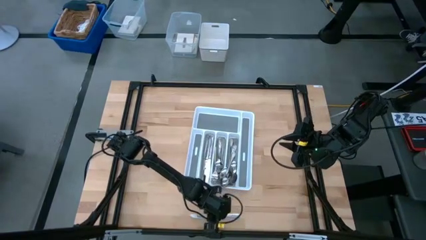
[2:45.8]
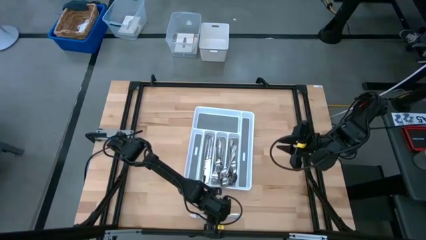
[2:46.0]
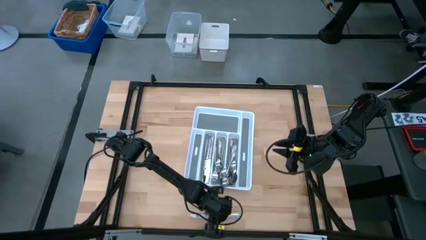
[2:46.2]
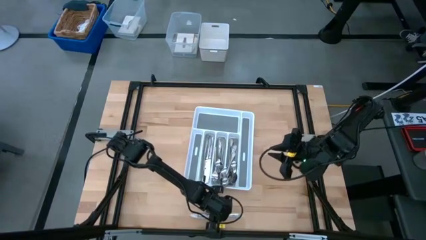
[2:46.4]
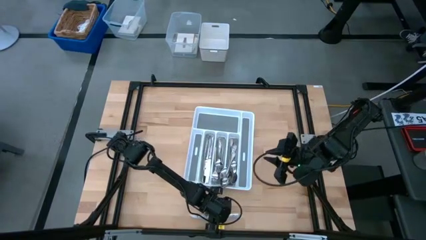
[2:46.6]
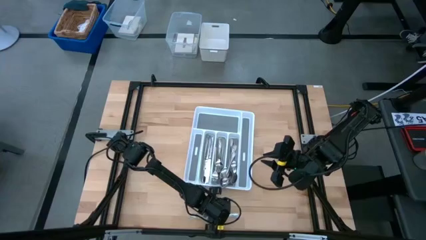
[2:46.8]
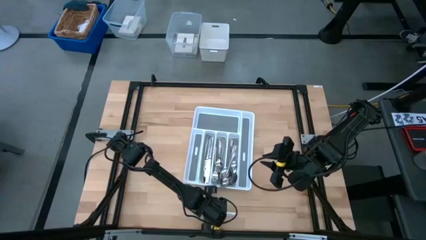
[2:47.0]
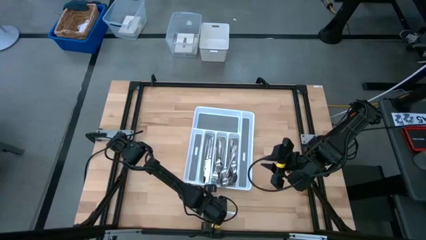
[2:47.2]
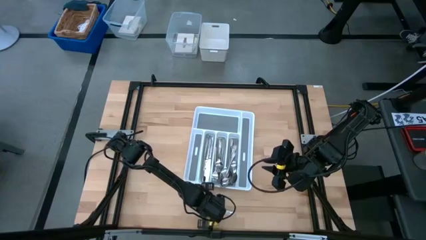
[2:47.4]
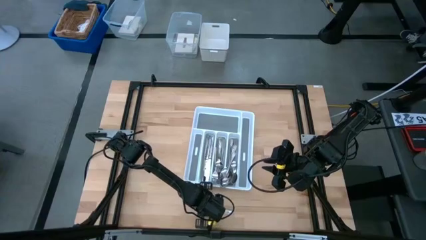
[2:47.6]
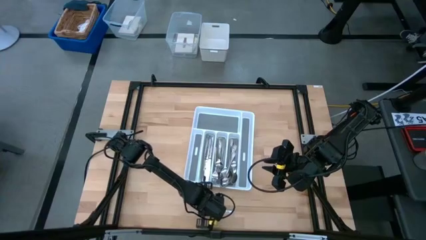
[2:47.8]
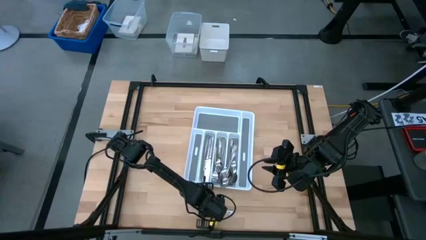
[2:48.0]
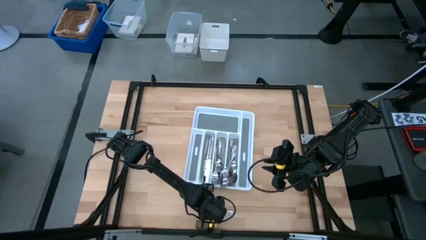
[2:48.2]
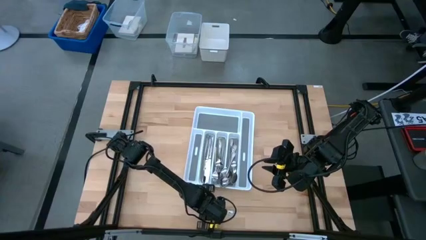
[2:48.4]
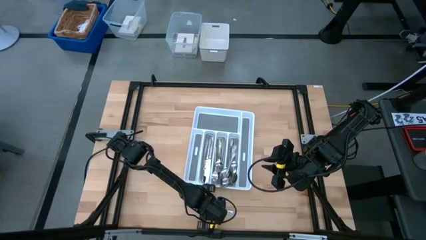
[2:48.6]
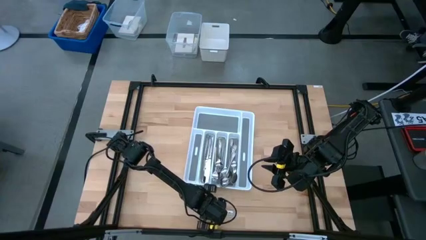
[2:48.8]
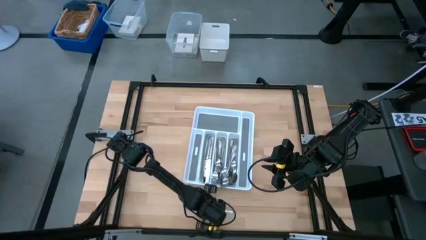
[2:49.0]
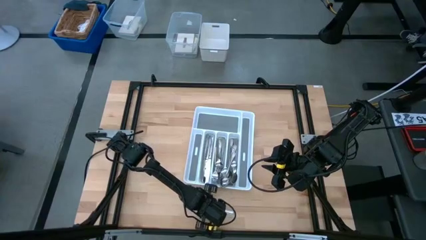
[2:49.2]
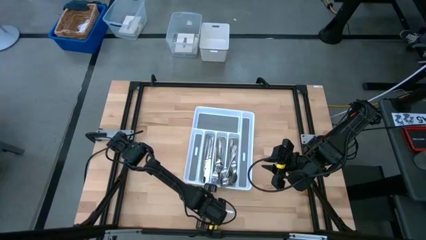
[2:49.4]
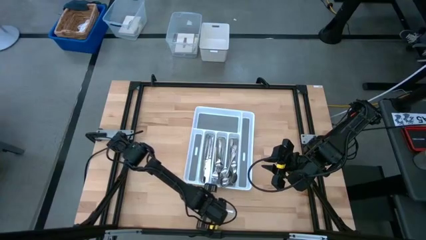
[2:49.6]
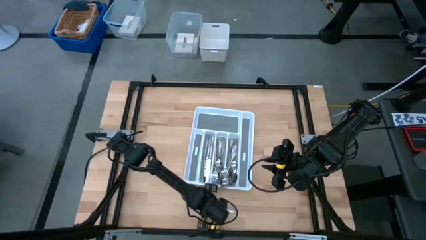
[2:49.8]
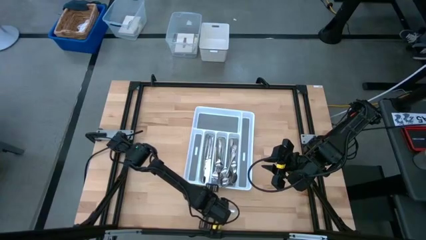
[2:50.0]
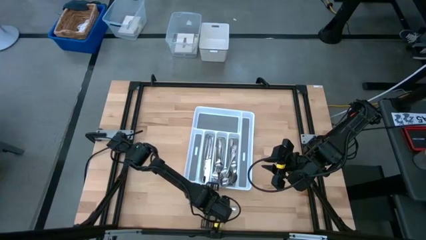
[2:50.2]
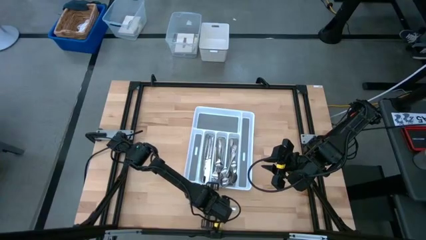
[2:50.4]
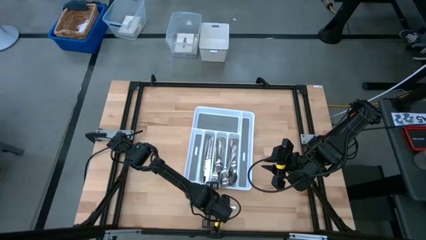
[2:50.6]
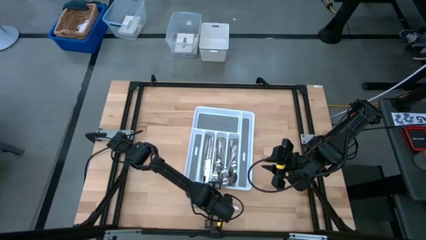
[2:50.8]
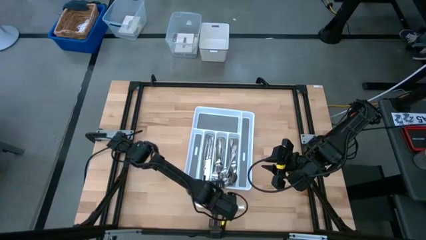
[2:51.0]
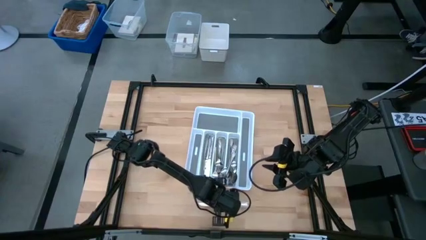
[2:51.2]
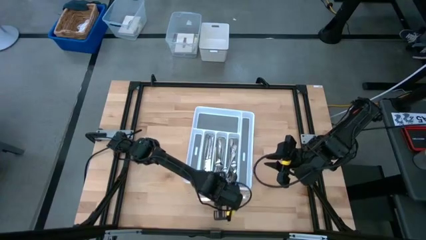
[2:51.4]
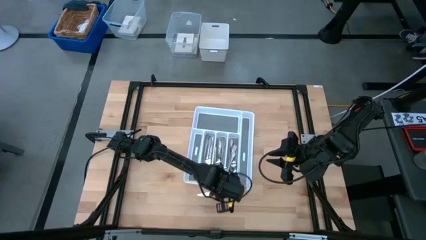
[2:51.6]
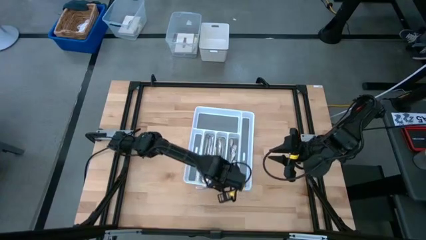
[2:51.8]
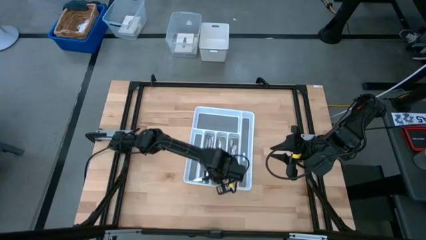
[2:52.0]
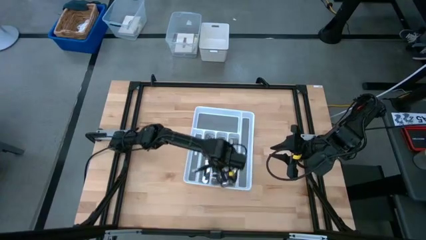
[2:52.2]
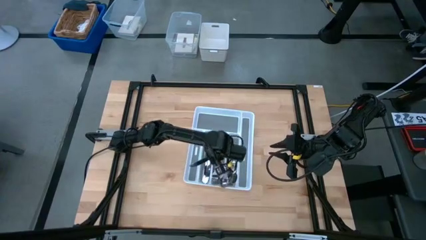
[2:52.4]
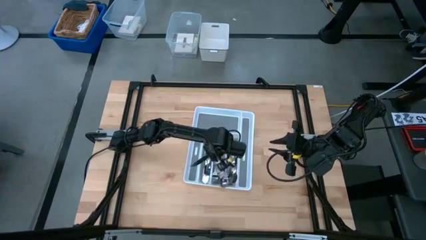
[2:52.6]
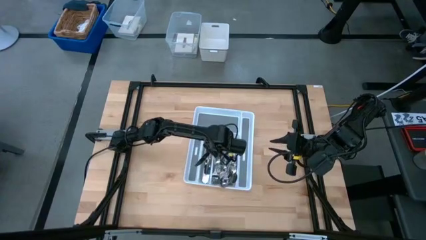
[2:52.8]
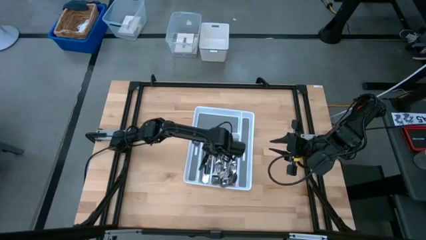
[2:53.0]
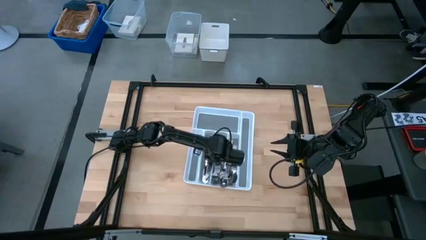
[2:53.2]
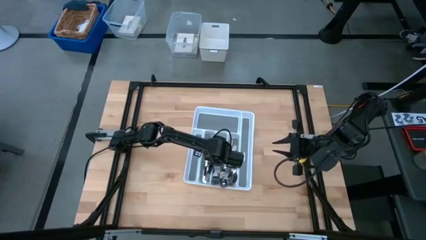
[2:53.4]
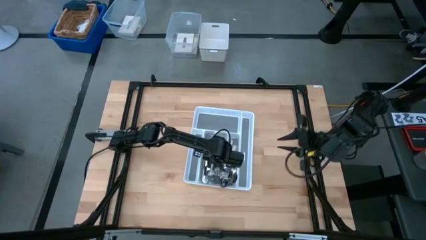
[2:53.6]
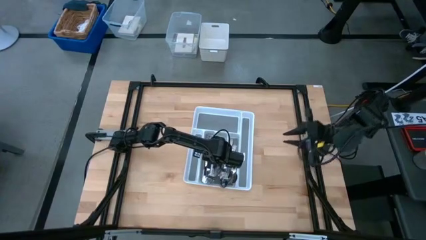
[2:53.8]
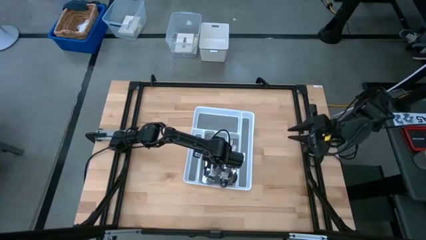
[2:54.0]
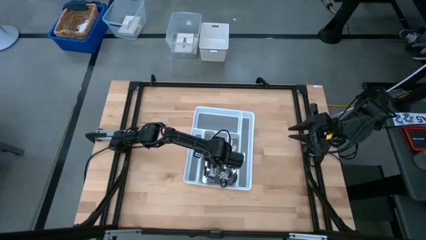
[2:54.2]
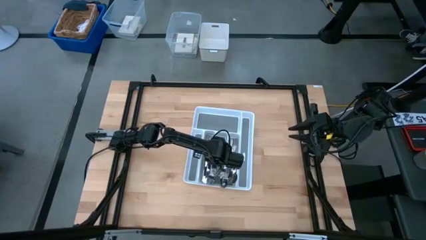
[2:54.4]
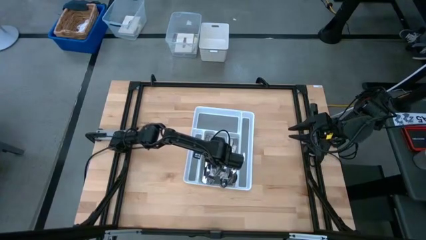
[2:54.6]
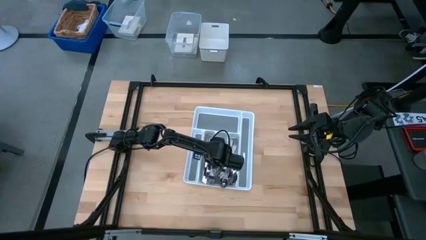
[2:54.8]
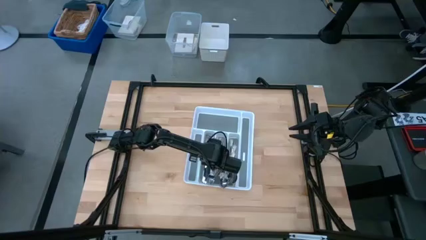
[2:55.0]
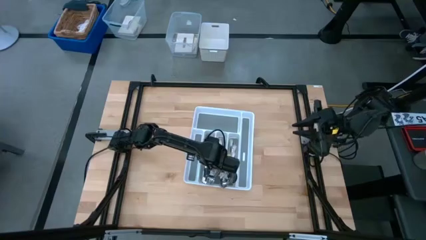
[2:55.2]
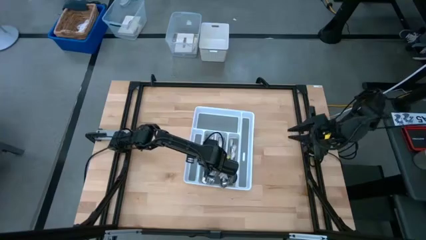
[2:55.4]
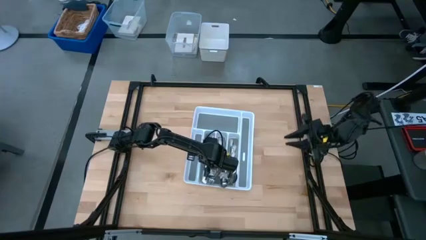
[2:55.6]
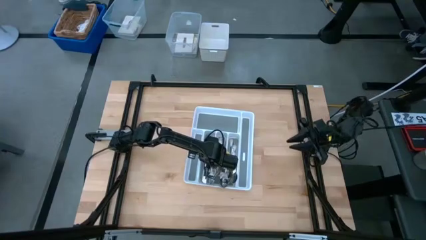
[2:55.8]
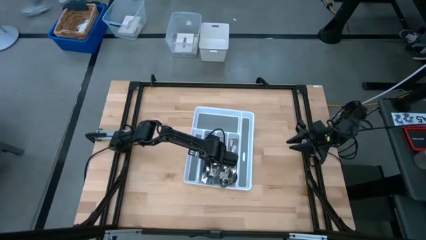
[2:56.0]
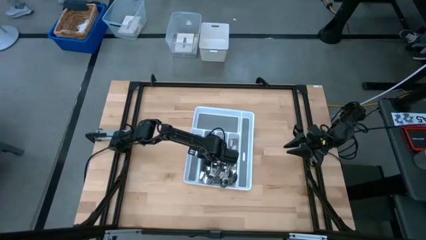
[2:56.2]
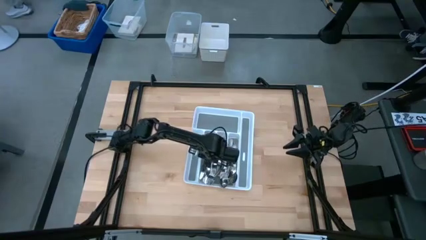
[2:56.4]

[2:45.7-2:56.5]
Task: Sort silverware
Put the silver table knife into the white cutlery tray

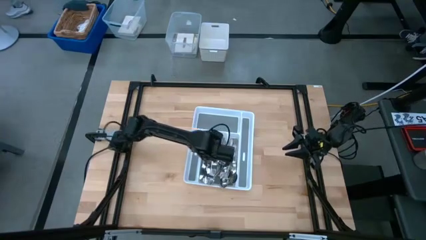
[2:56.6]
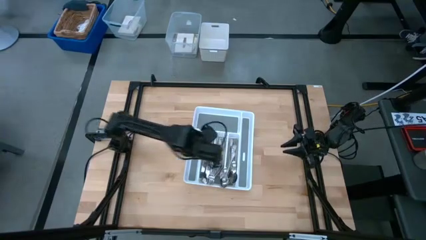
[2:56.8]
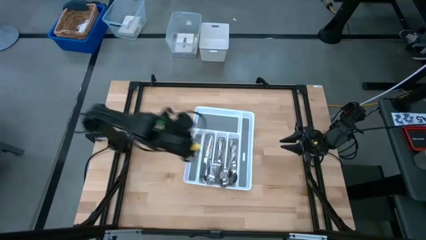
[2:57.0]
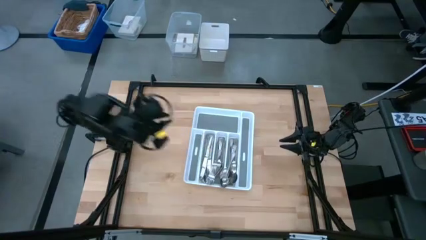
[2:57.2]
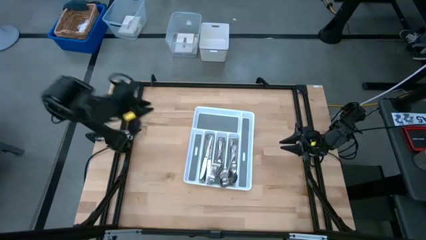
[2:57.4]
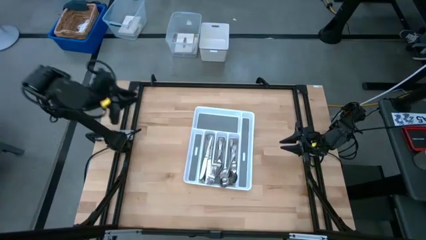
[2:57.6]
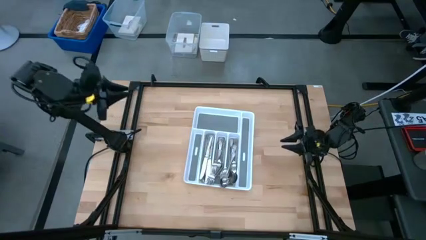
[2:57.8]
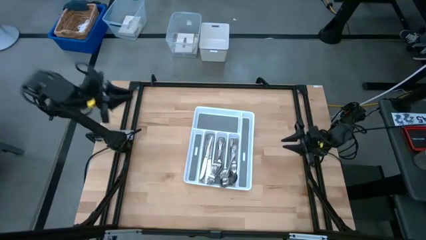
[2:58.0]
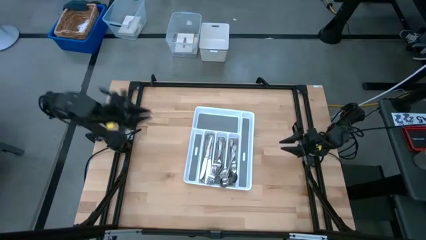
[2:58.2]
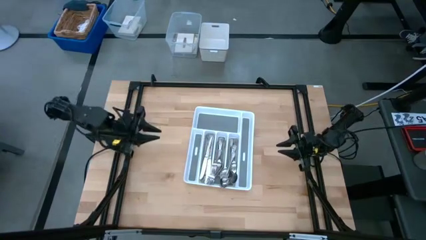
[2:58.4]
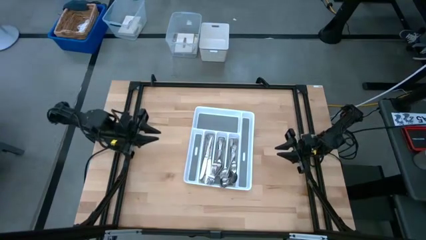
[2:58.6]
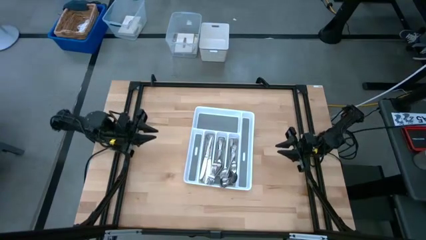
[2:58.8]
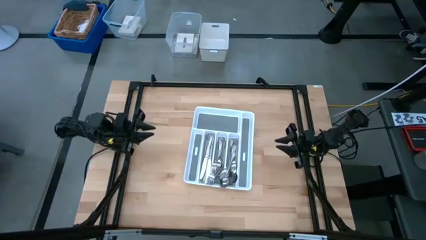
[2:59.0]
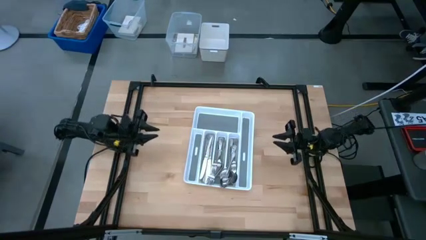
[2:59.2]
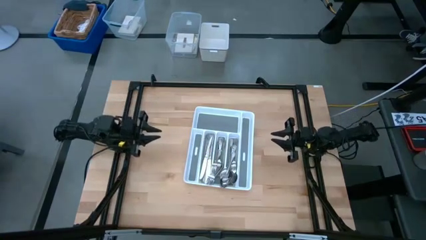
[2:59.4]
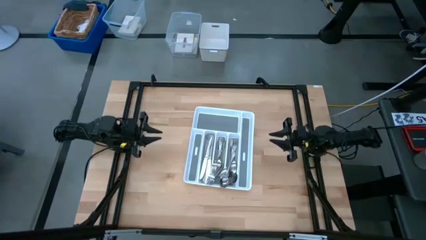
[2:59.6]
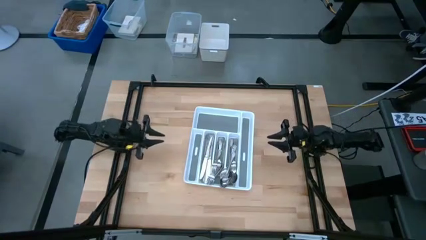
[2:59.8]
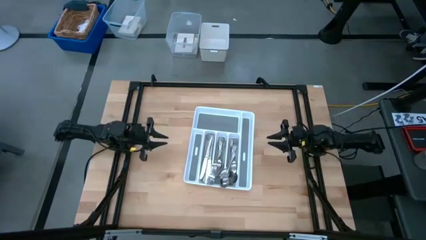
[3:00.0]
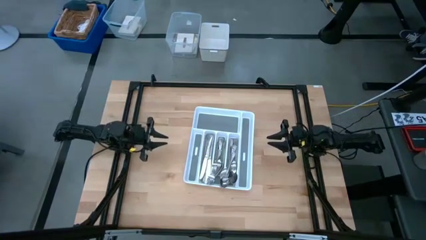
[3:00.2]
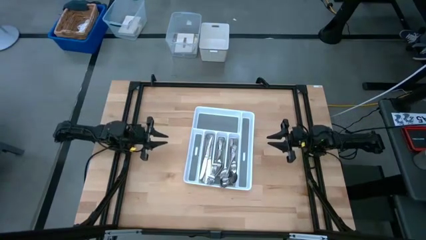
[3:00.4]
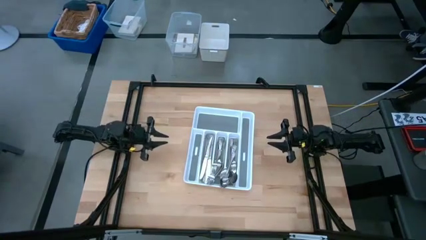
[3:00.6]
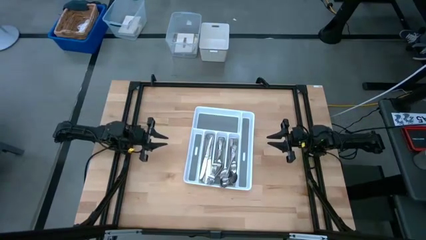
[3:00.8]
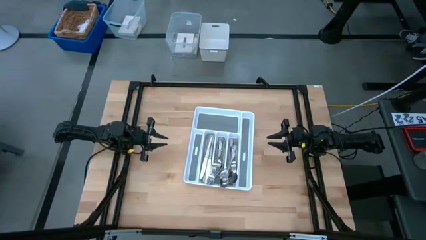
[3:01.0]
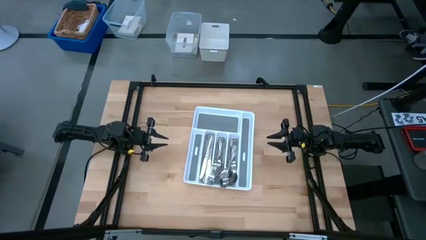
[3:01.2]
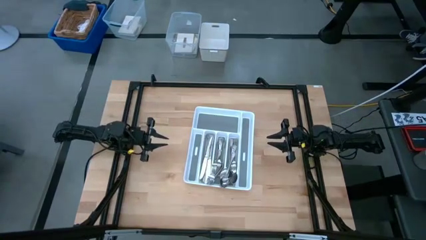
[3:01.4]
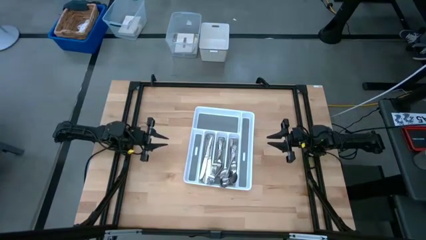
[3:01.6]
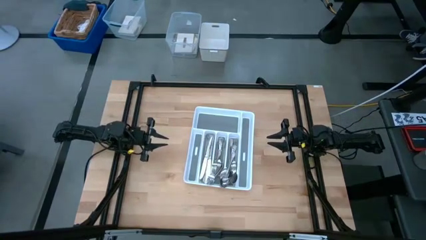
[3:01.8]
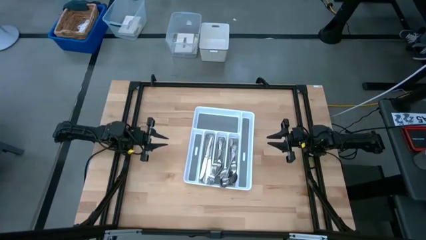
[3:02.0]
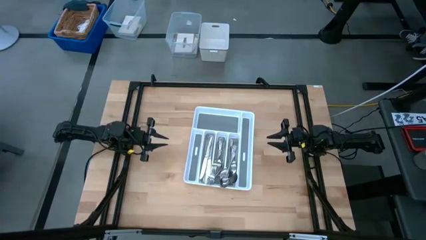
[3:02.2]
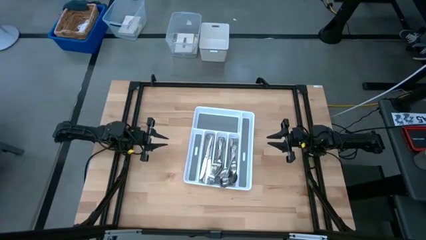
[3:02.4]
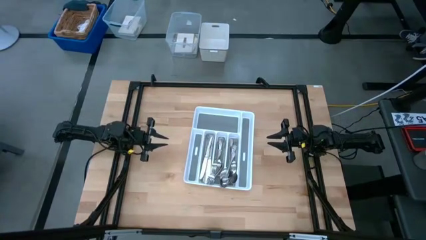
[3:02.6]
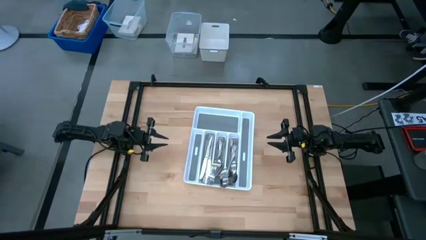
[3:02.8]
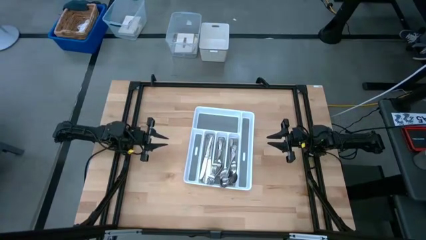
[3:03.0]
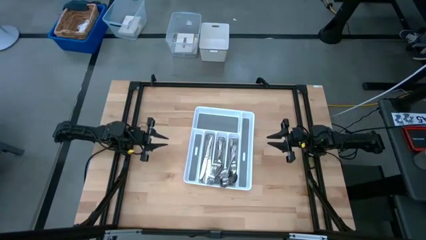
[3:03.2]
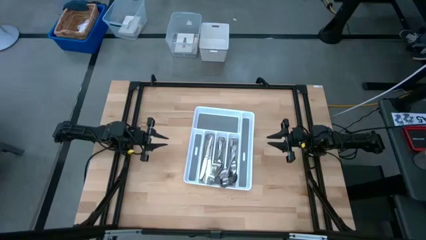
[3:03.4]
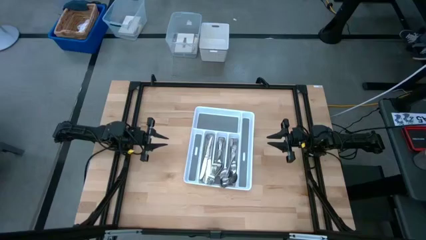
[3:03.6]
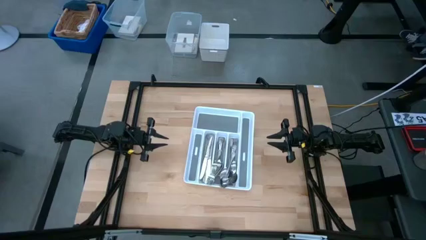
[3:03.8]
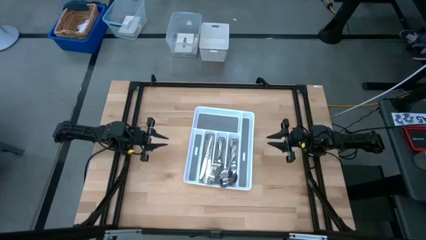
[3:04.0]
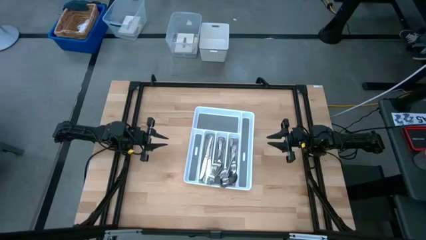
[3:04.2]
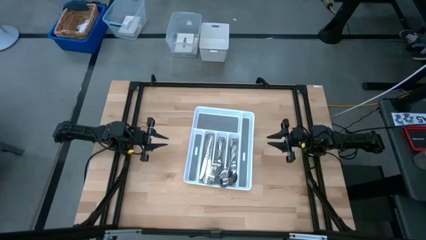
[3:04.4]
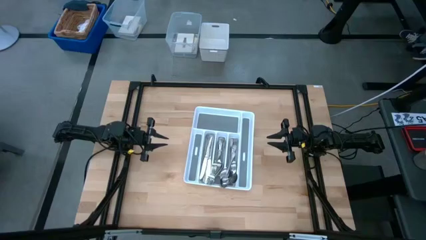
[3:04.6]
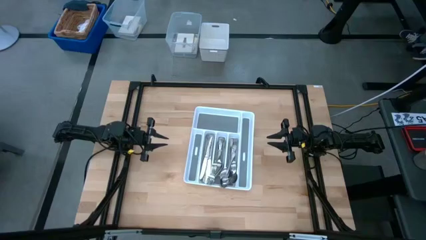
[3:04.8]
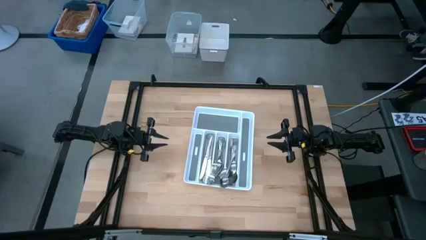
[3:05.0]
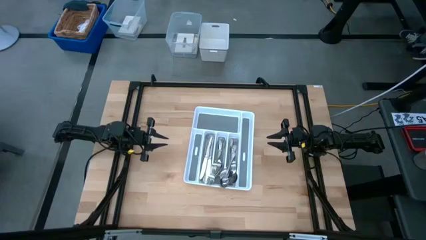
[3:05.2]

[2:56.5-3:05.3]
Return to Home Position
